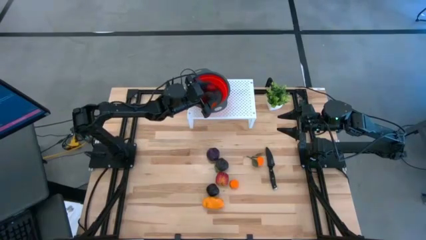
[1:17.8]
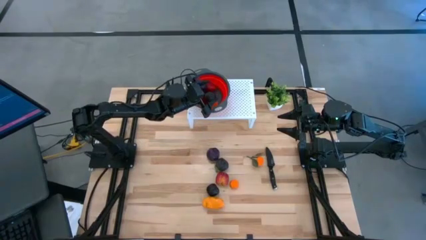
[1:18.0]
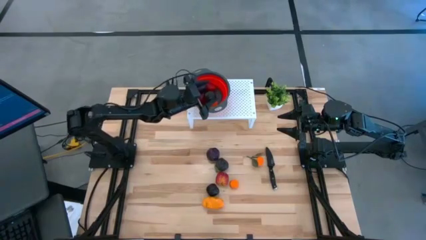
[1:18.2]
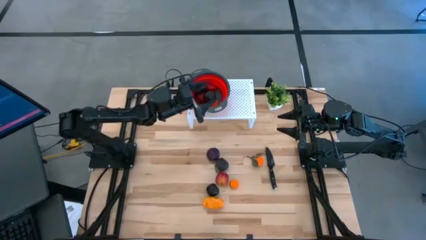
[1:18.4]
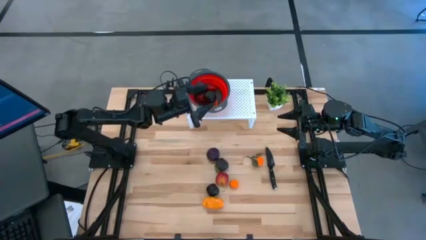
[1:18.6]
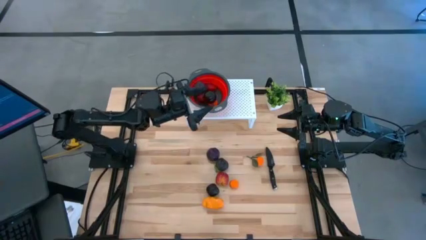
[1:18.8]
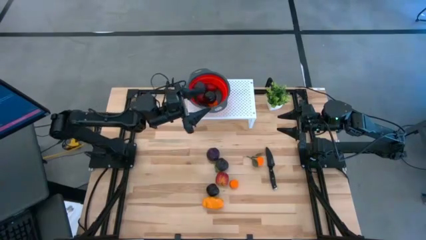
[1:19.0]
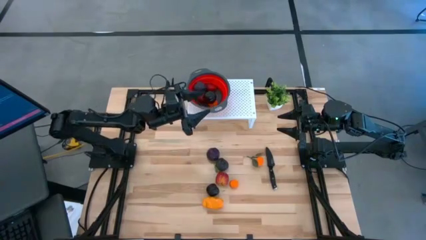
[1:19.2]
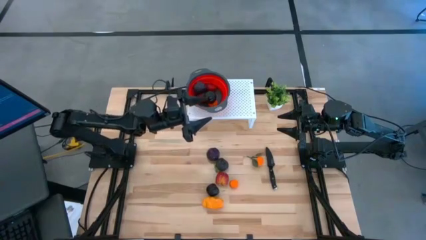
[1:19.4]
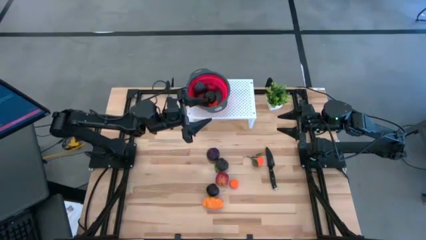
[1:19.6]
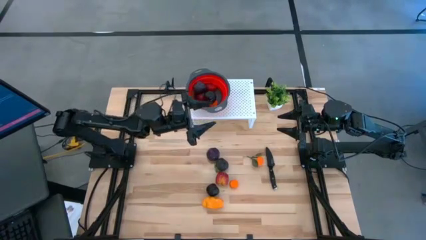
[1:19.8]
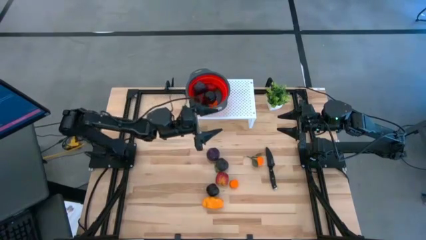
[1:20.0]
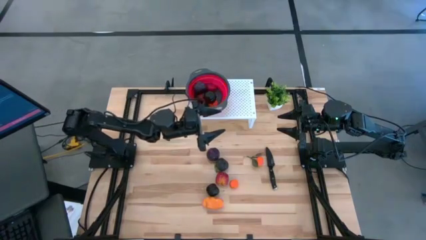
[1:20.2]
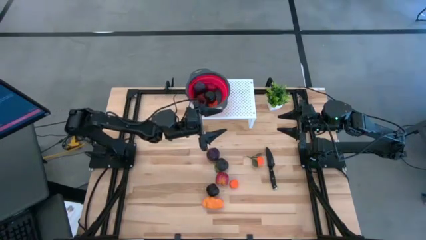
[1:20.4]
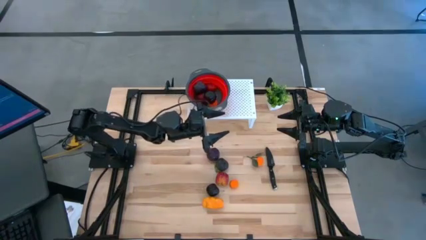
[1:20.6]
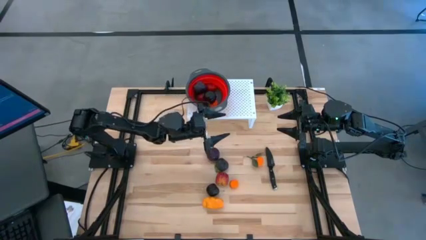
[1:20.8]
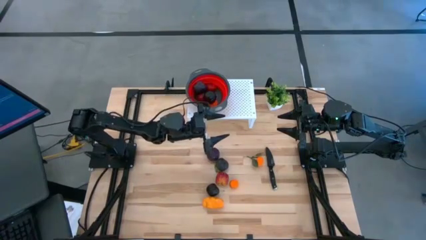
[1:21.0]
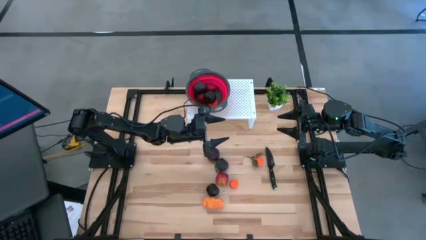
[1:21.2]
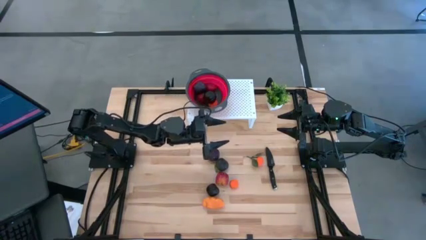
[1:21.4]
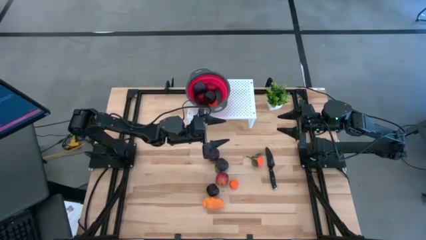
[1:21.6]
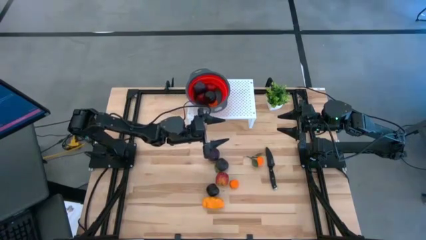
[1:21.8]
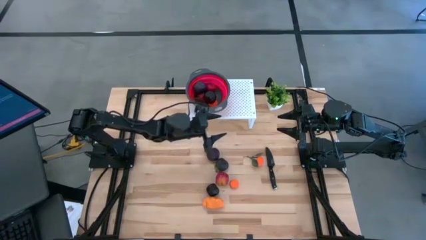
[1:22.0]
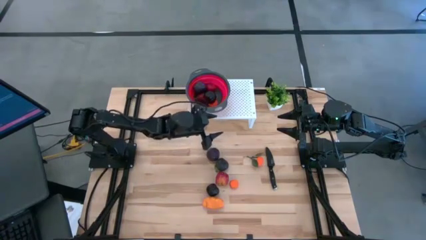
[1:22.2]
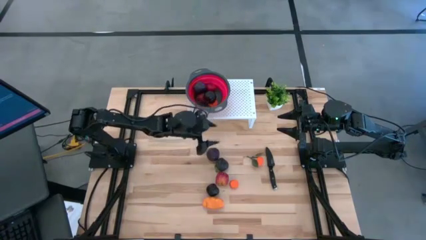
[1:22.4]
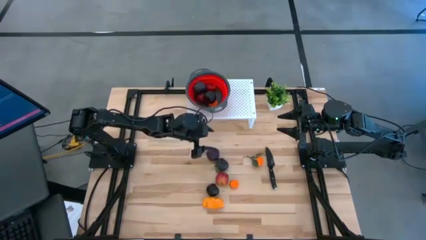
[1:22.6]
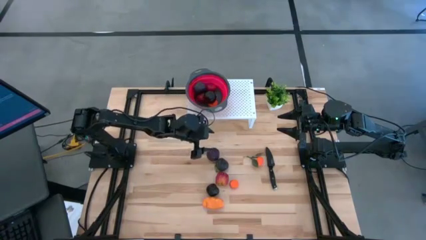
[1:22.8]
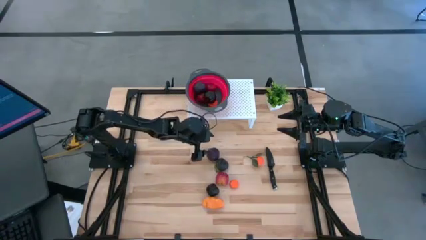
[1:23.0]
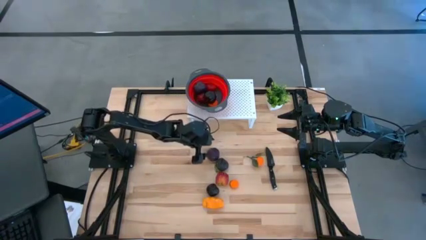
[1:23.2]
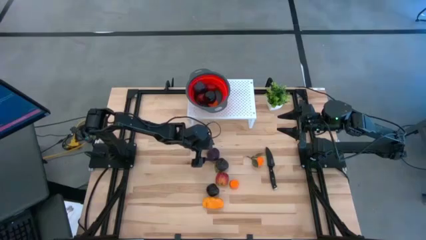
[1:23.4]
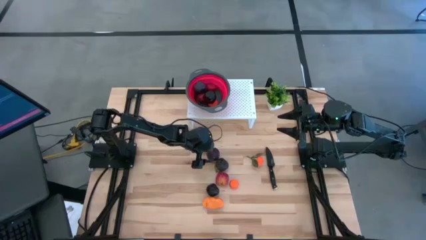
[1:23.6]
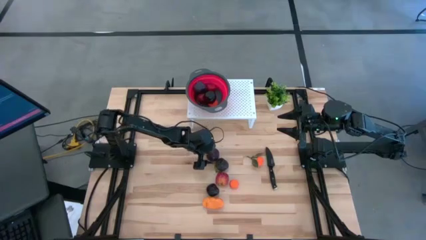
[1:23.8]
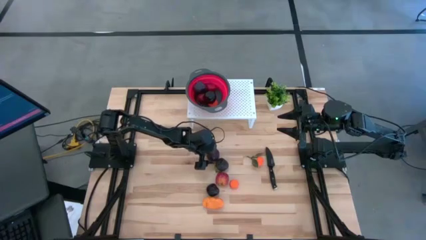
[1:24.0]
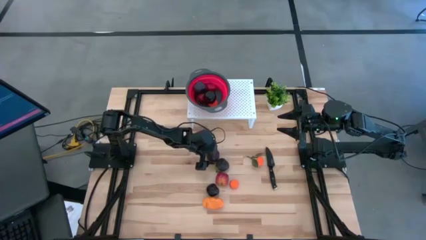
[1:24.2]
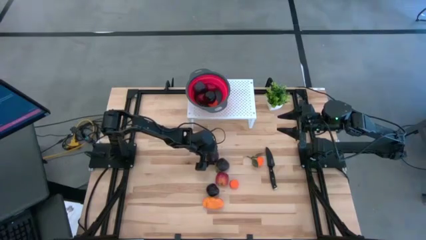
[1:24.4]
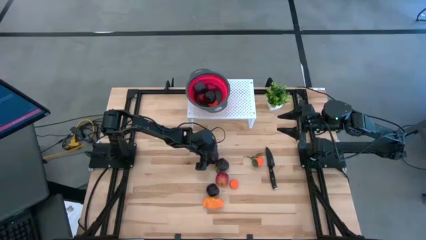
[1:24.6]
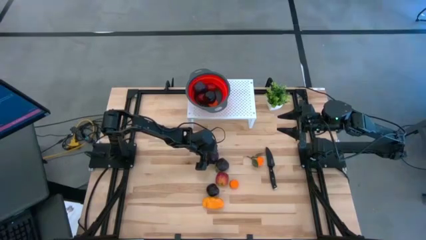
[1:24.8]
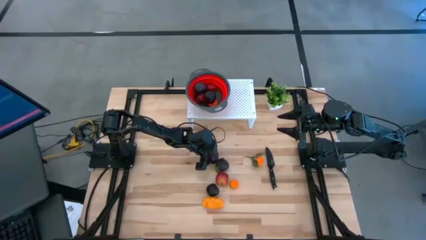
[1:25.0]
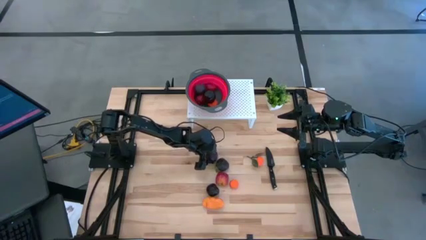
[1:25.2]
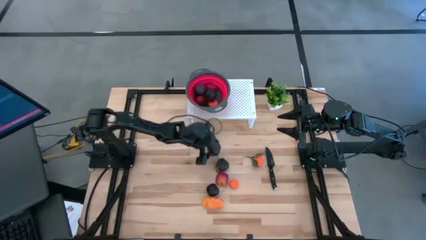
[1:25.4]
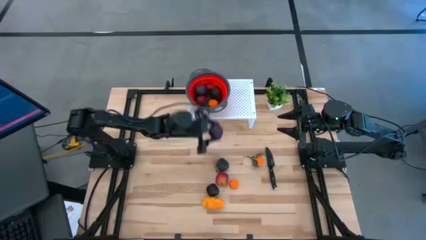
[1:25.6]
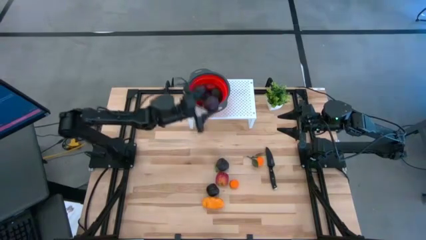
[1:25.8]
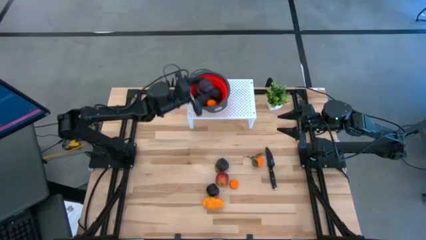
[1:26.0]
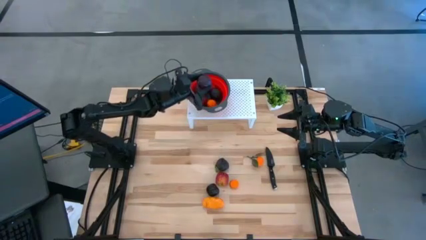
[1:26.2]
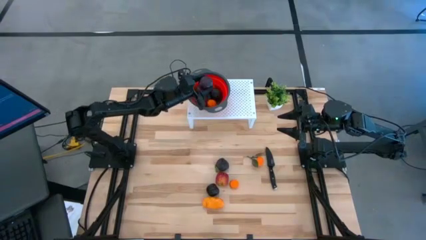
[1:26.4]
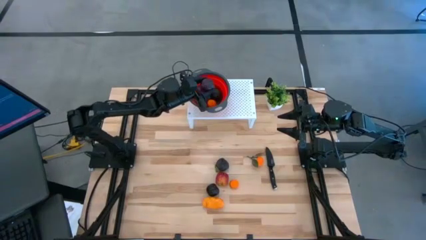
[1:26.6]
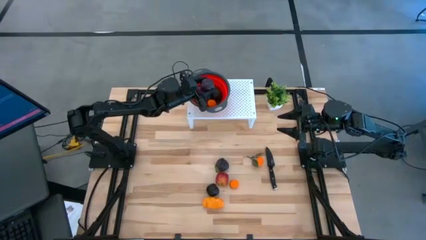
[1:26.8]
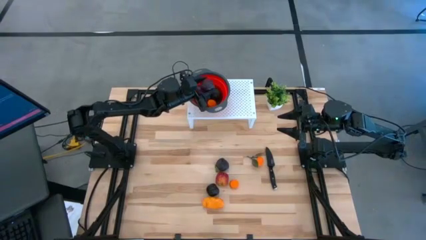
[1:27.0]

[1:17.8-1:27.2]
Task: Pick & Place Fruit
Put the top plum into the strainer bowl on the shelf

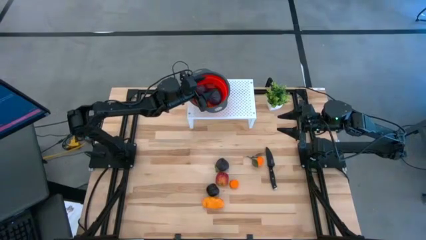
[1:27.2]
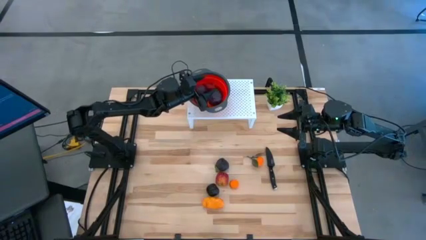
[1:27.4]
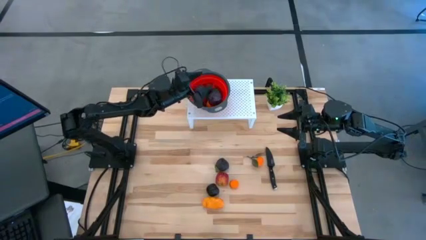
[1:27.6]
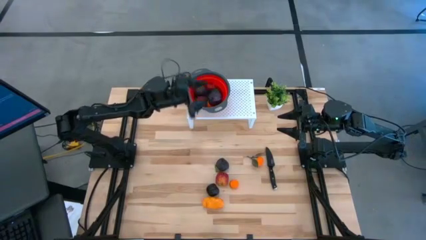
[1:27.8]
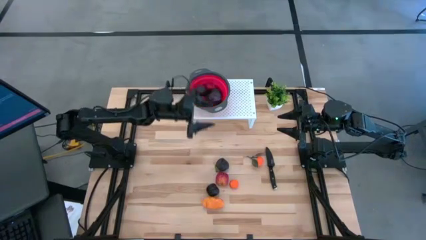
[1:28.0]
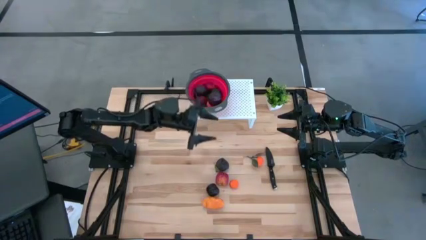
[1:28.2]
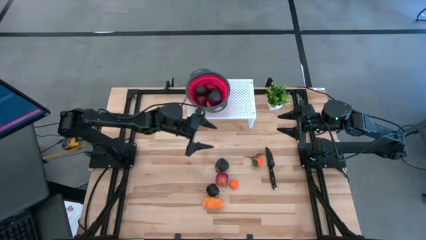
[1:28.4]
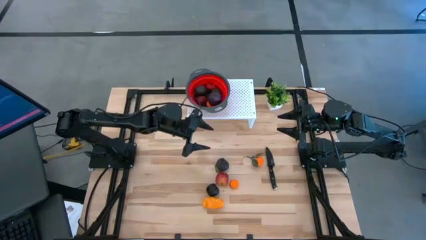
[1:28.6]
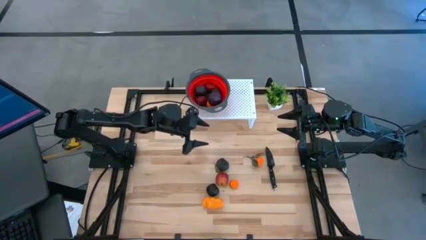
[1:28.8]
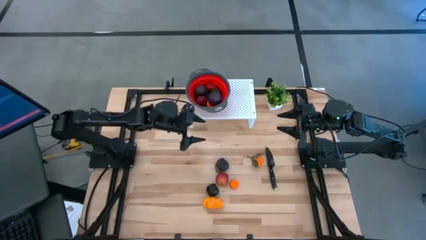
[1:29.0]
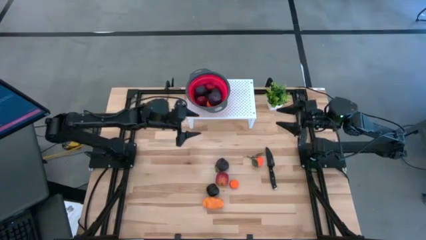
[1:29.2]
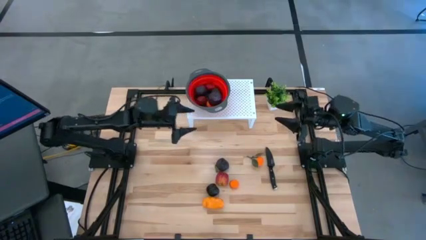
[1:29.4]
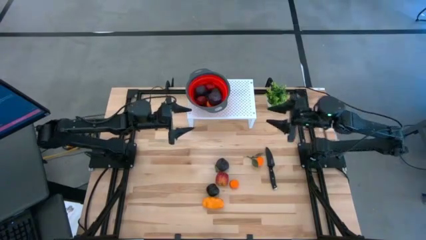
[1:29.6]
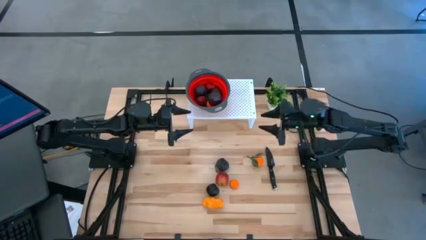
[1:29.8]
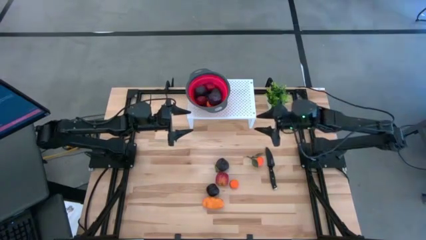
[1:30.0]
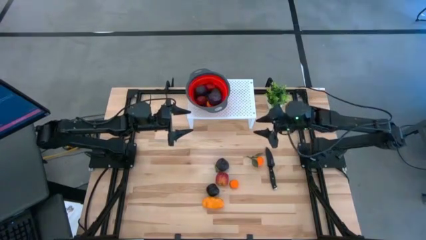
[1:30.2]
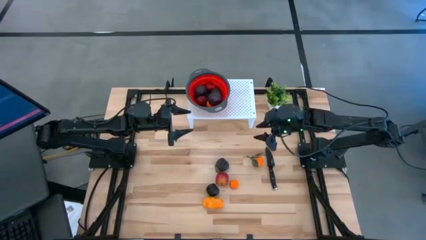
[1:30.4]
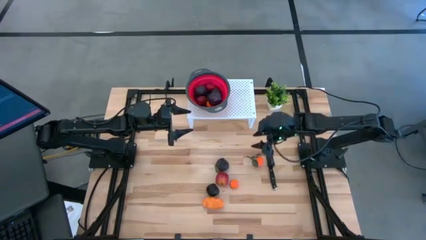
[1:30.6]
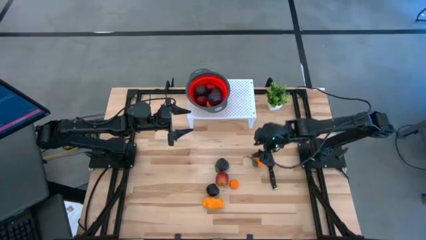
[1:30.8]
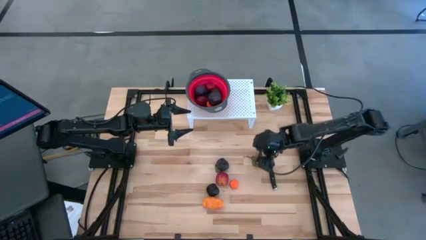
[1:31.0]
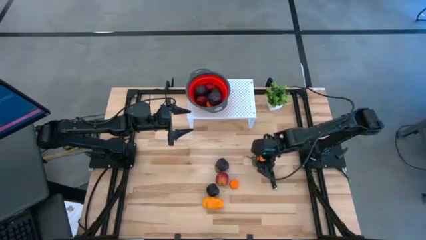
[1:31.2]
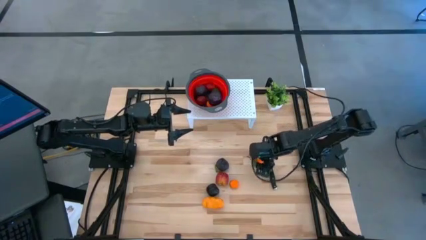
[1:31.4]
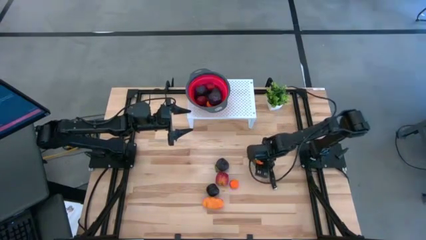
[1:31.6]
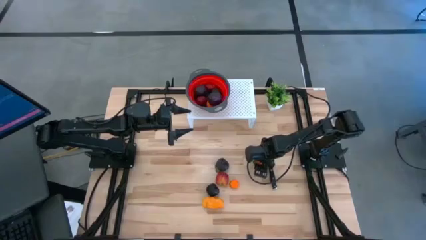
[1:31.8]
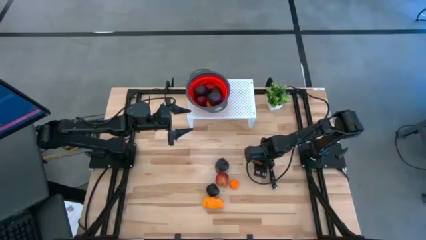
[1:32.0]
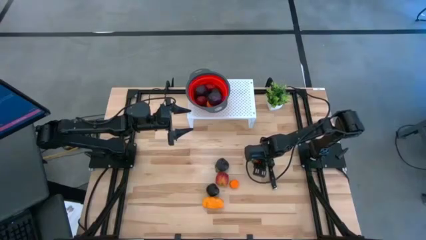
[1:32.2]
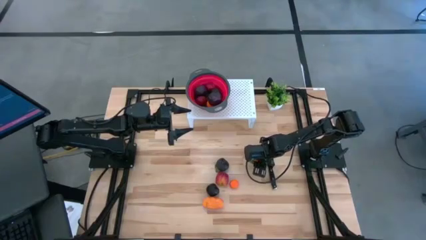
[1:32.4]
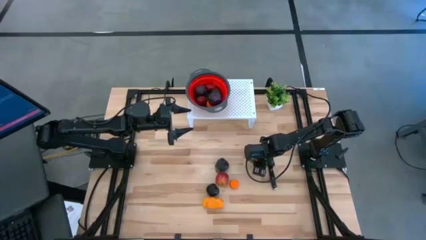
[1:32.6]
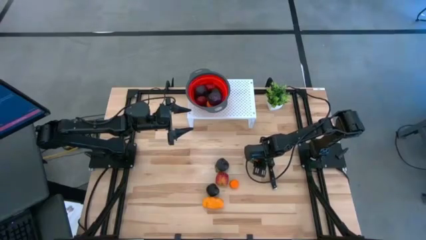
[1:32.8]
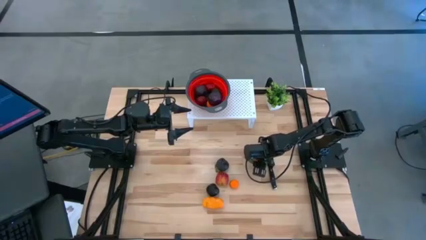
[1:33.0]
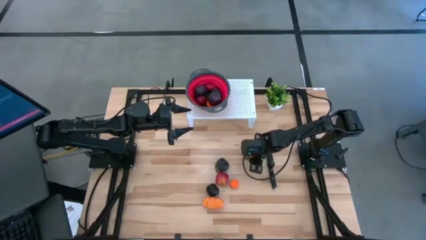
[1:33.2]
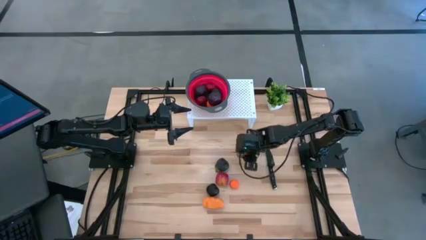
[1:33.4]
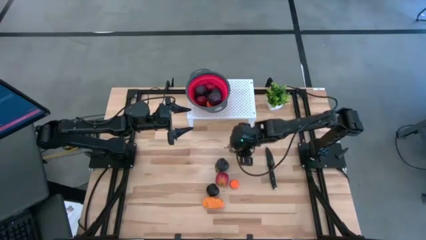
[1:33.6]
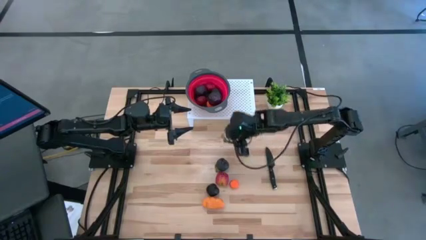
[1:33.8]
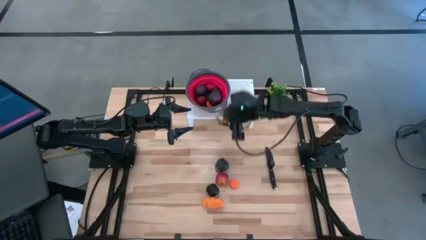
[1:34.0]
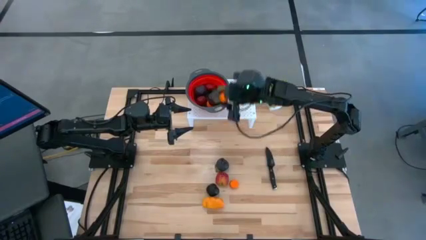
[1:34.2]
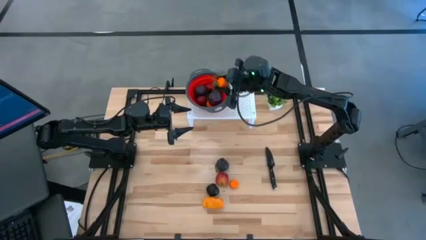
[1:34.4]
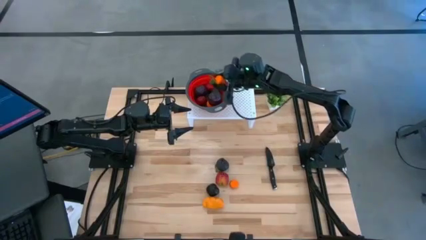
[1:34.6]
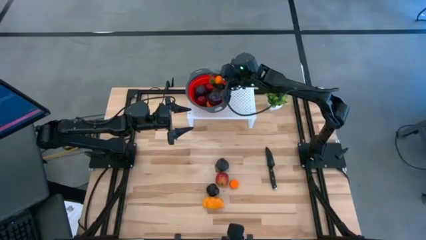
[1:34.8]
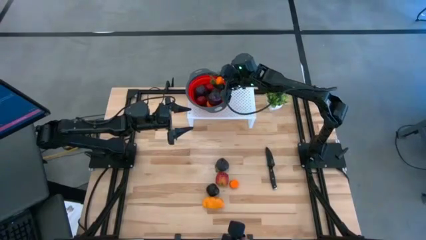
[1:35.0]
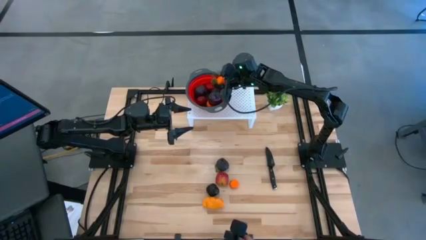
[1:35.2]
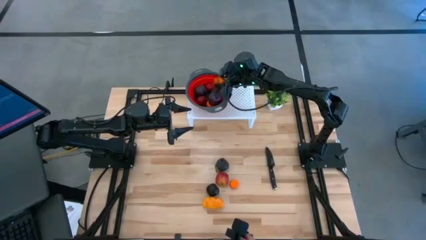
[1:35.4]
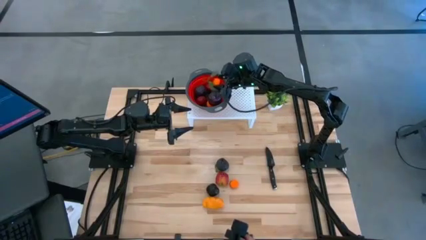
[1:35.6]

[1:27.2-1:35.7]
Put the right tangerine into the strainer bowl on the shelf
